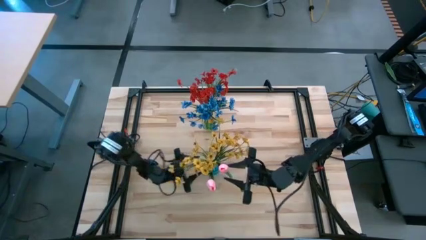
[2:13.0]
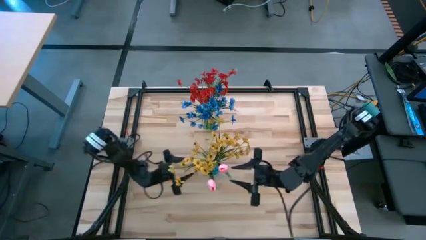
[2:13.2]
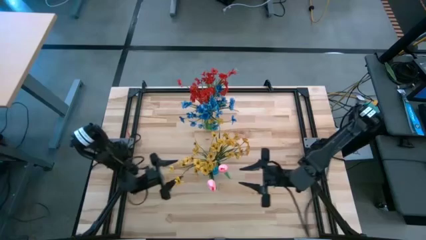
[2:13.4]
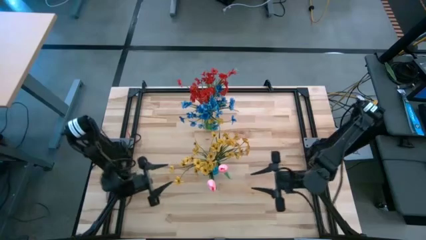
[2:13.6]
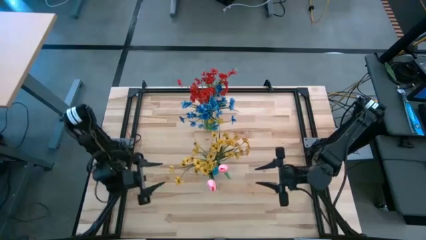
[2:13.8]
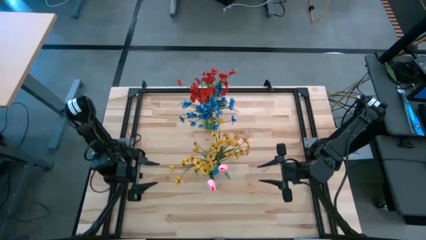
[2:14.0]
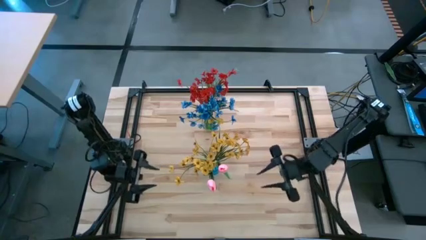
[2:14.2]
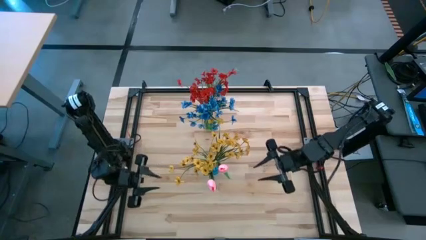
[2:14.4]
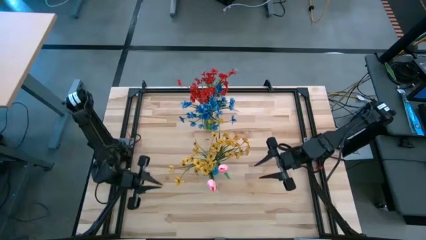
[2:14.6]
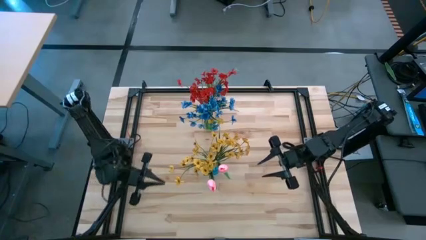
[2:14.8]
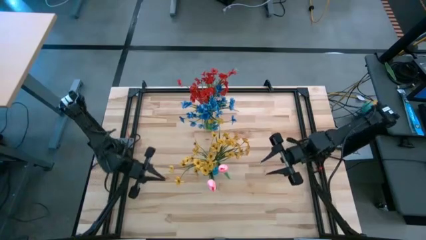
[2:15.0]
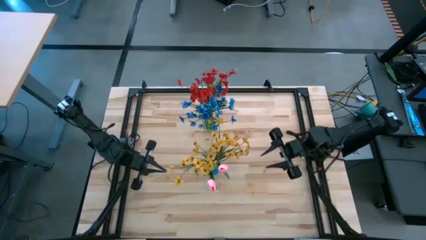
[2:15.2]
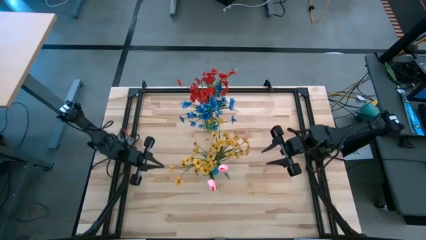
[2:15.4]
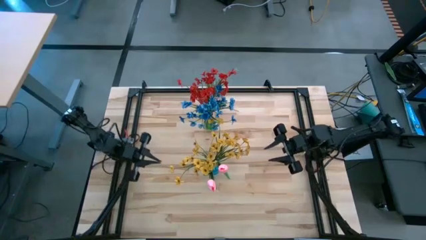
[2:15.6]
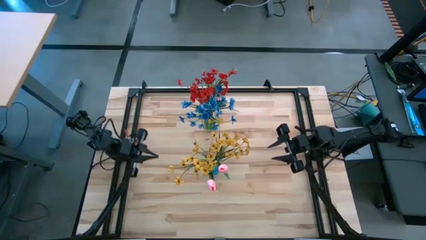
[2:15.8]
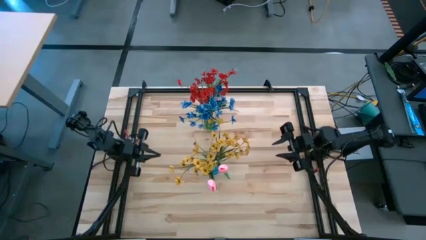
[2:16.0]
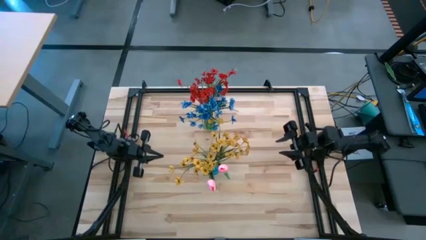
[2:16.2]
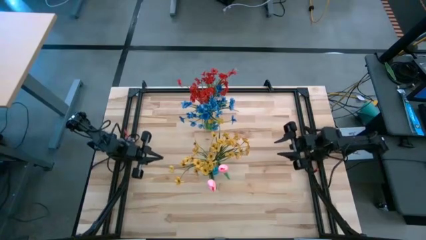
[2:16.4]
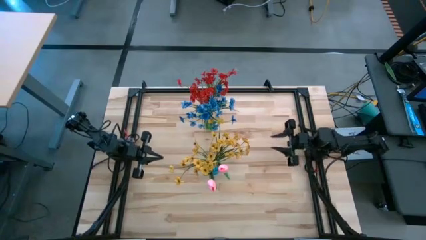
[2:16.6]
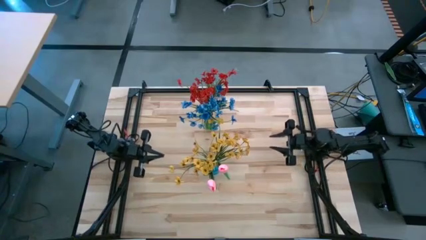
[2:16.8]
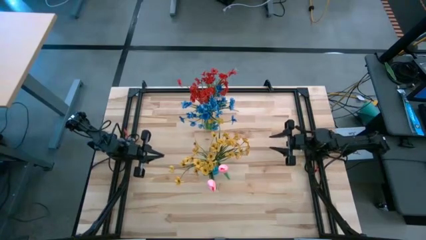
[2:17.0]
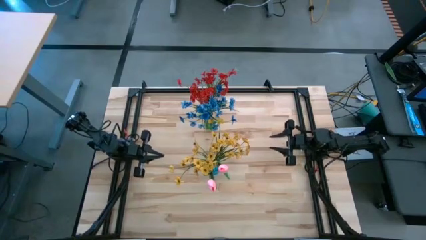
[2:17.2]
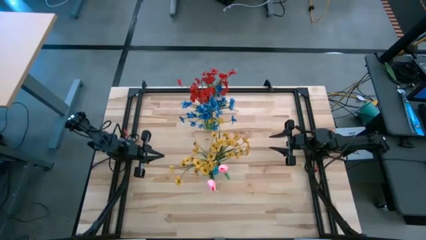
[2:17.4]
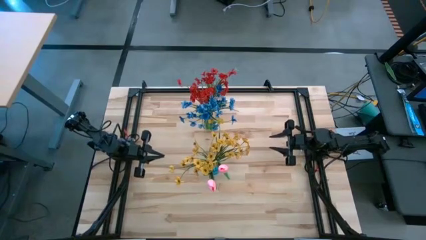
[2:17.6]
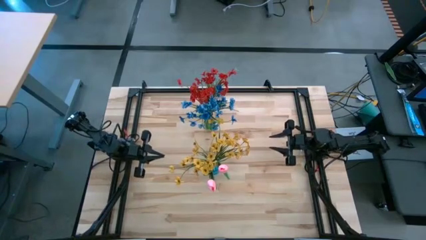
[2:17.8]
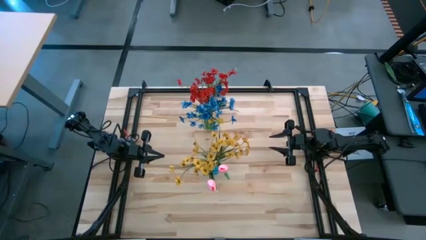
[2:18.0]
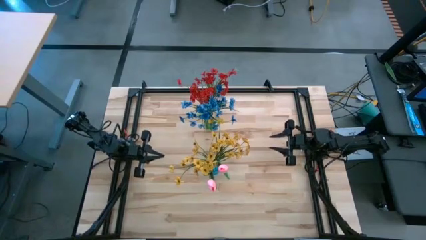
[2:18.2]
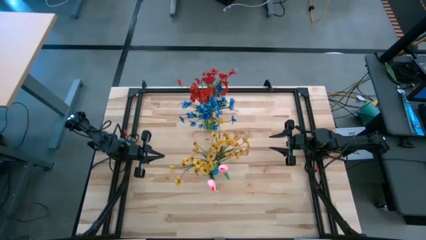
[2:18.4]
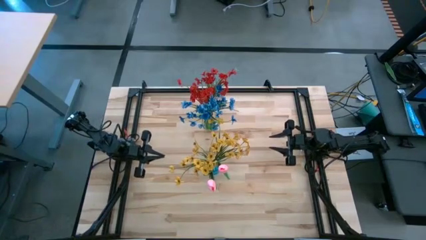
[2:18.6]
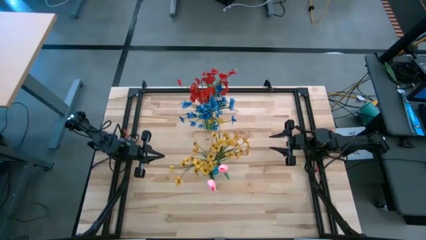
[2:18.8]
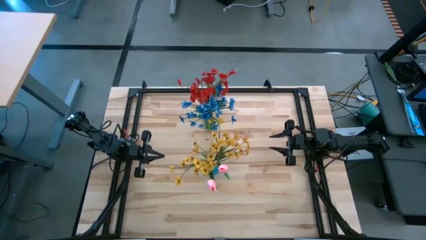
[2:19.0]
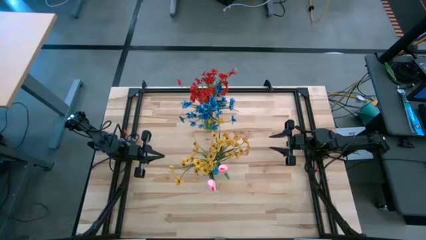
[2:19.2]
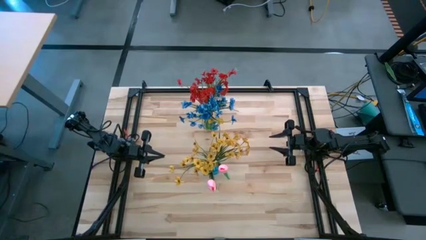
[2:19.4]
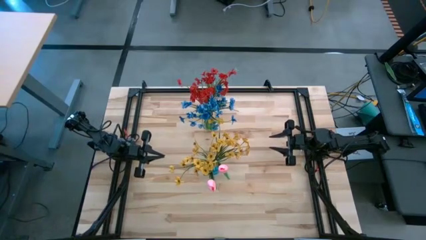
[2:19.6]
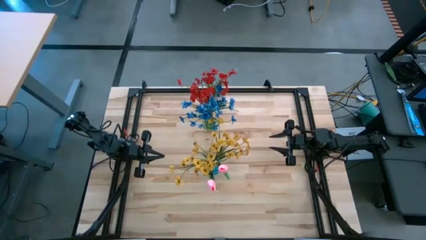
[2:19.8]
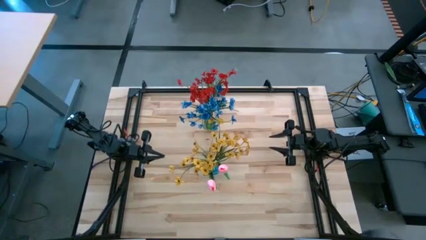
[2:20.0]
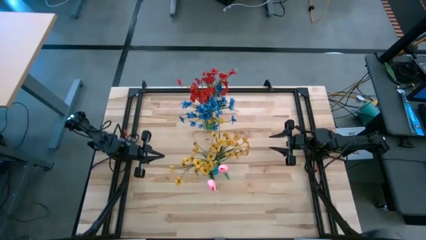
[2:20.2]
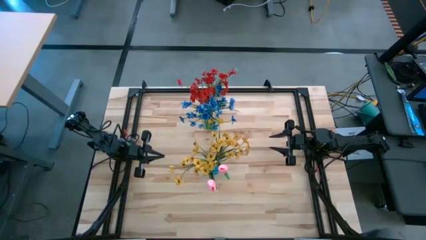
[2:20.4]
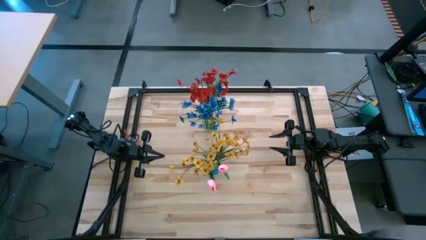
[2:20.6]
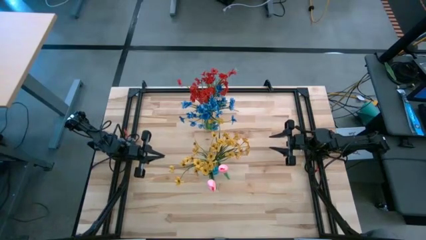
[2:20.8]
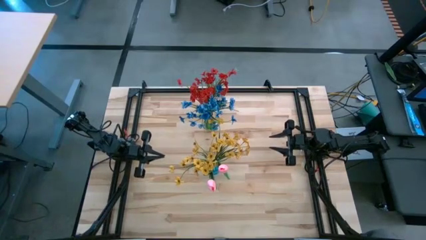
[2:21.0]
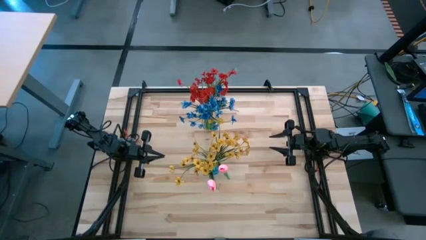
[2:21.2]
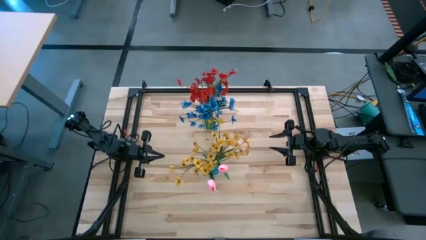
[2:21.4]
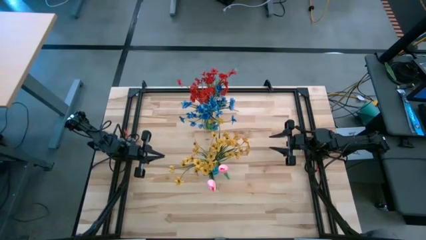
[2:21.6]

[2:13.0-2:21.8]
Task: Sort flowers into vase by color
Return to Home Position

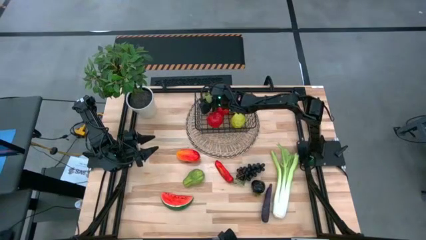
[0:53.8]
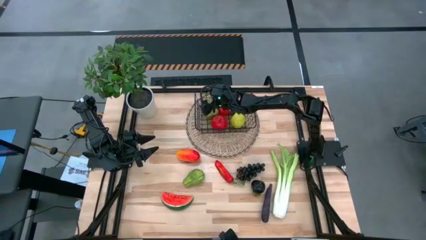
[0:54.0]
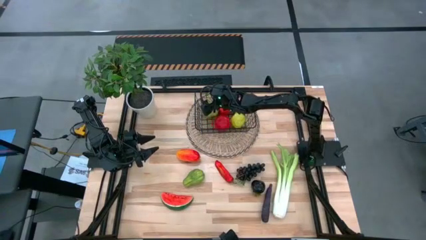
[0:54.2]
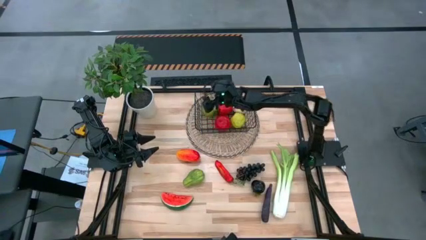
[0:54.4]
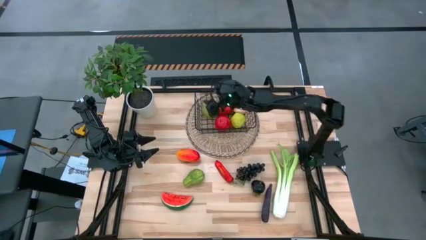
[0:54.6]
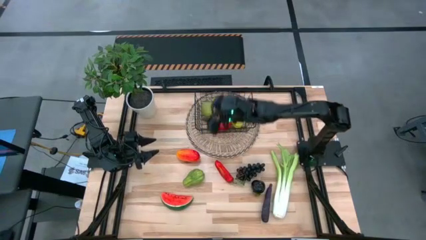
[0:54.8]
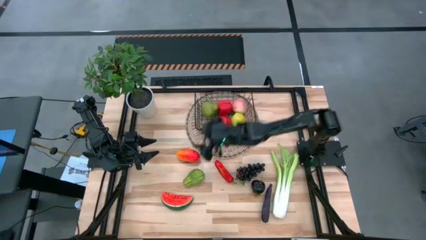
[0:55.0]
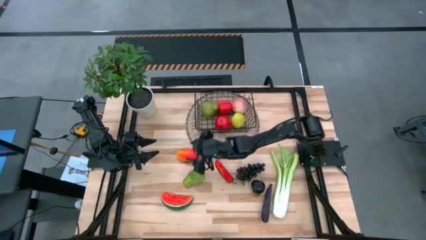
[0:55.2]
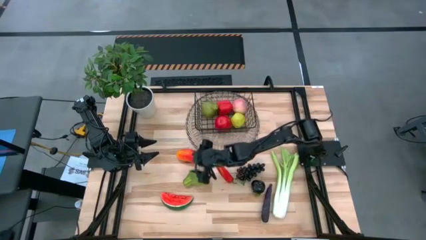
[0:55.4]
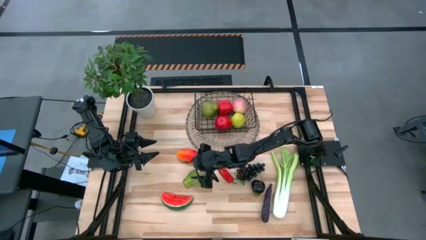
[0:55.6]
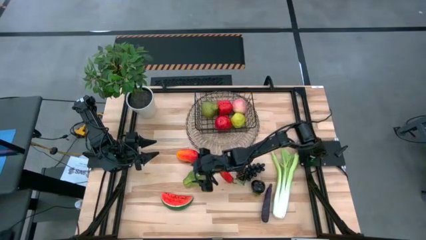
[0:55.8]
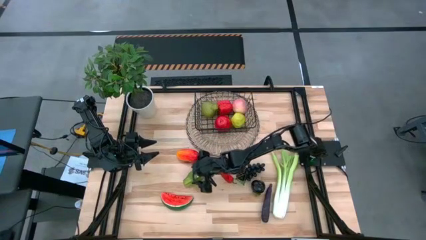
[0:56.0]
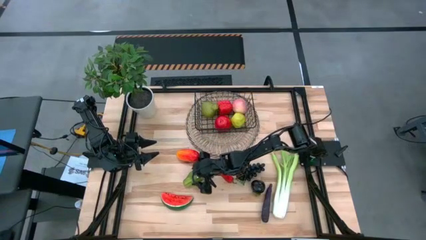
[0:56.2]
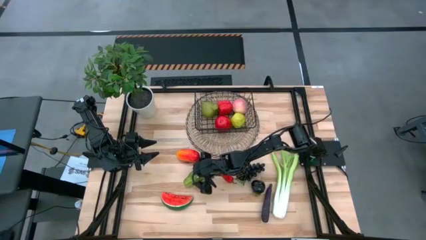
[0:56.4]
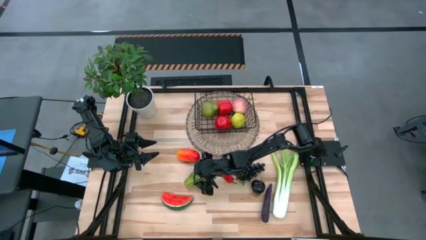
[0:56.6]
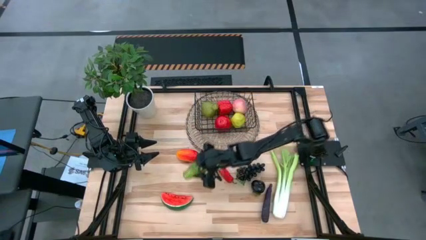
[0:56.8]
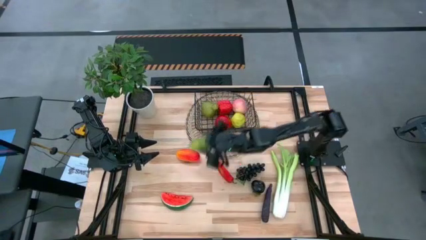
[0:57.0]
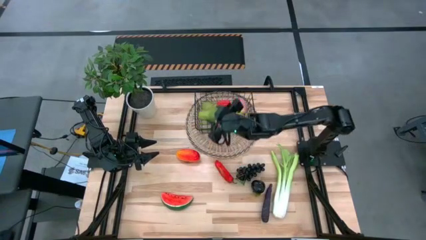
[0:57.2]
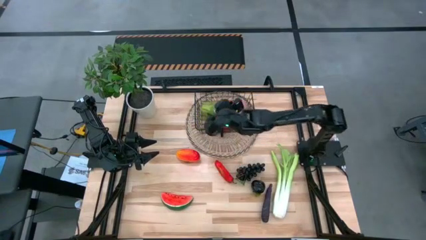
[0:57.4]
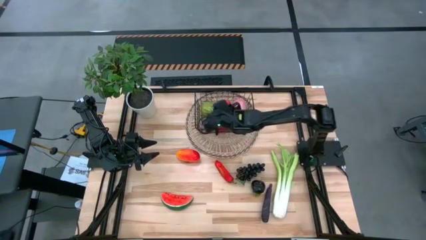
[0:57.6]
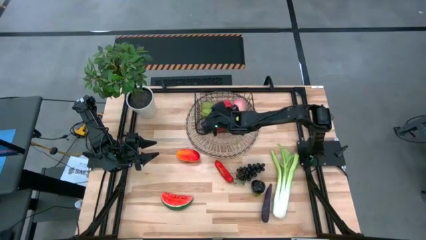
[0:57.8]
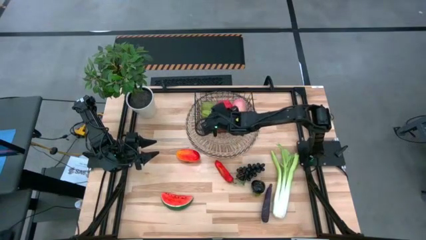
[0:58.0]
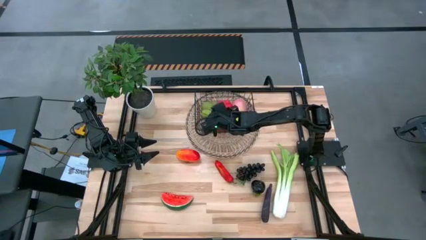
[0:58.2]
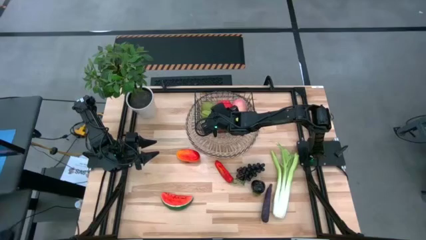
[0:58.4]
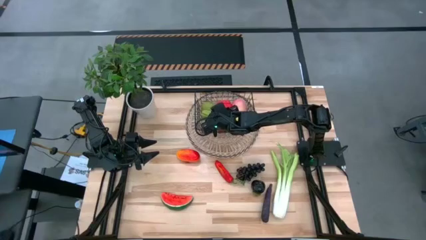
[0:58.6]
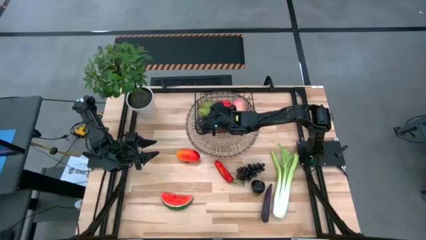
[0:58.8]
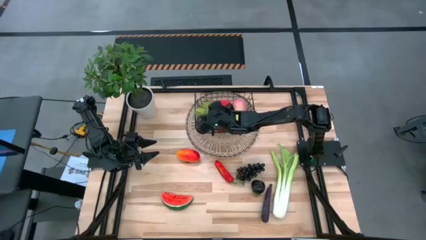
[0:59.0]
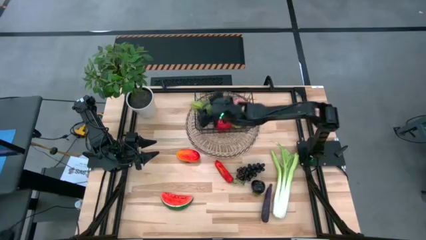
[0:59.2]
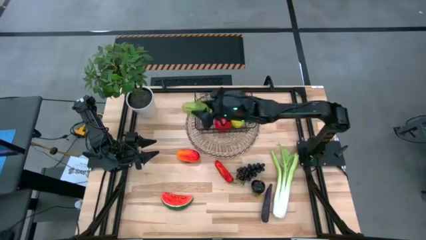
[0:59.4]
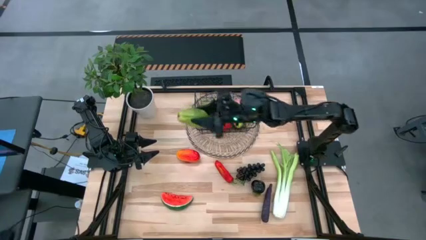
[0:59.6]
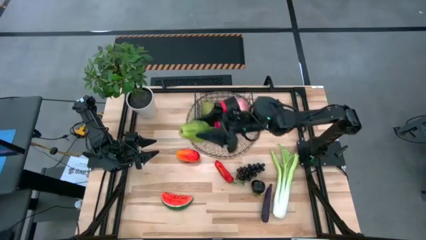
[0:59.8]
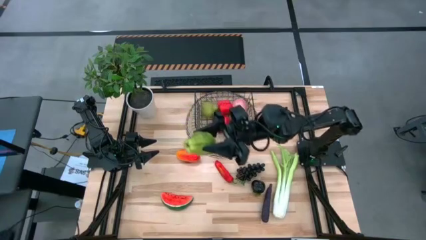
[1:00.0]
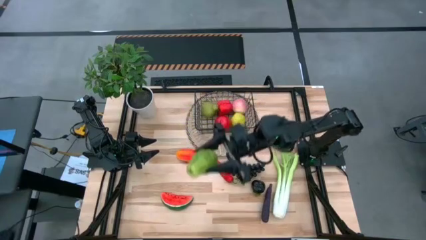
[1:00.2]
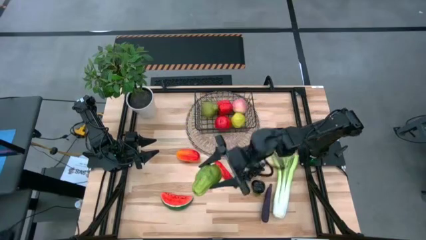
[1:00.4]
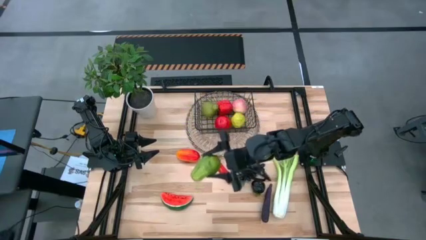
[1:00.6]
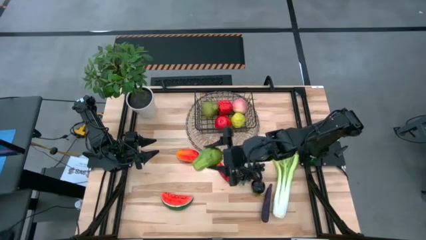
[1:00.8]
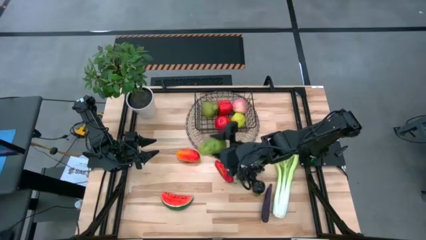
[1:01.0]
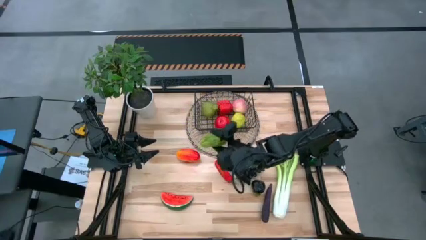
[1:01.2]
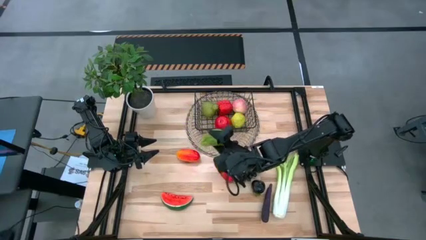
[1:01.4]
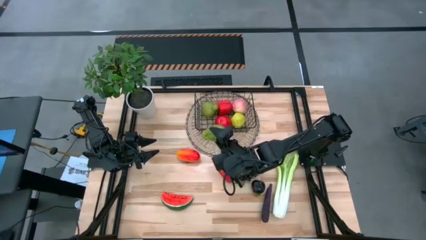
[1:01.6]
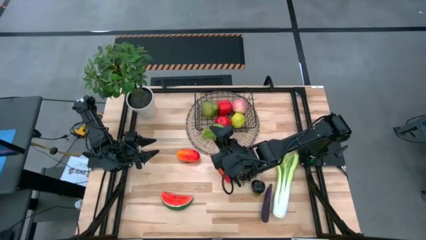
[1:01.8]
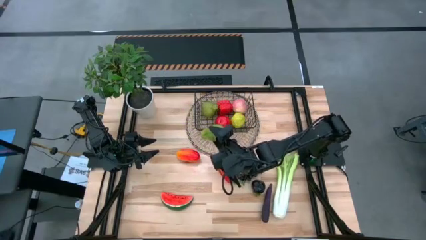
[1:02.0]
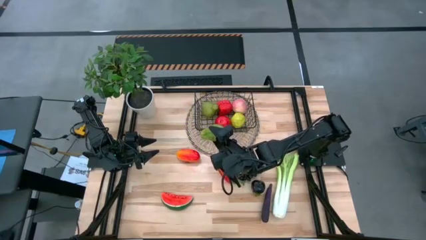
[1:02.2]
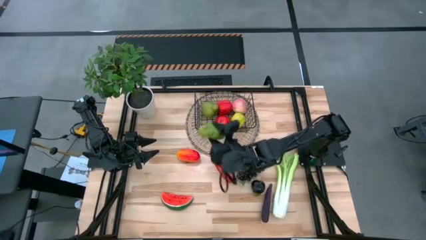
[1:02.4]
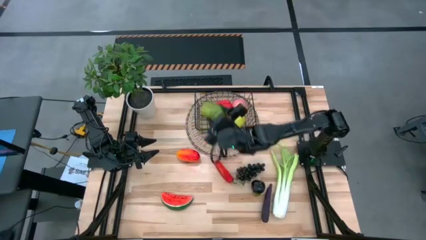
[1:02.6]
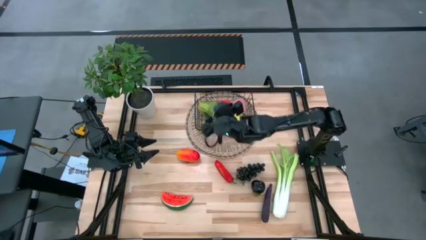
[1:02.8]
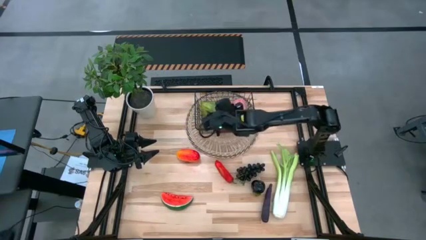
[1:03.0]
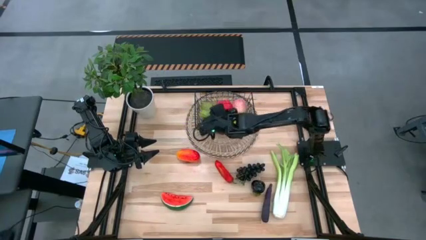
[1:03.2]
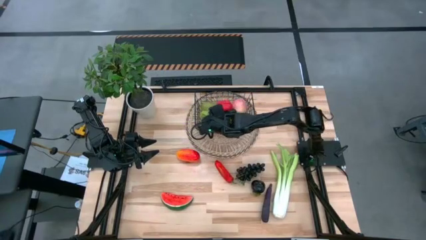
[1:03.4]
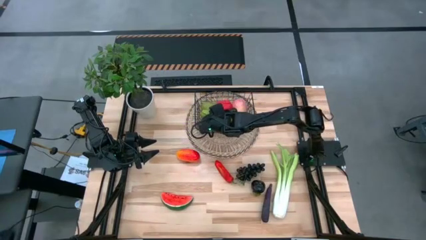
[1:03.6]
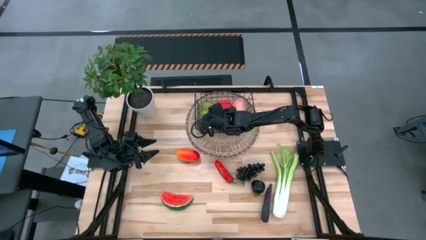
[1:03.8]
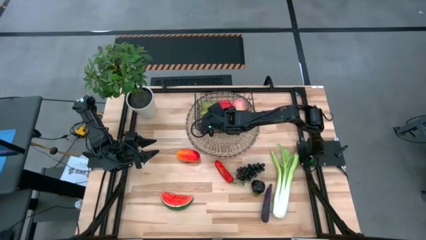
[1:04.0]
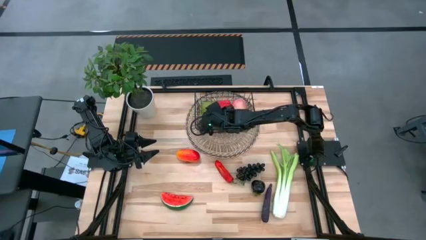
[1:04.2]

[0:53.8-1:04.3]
Task: Build produce basket
Put the green chayote into the black wire basket
